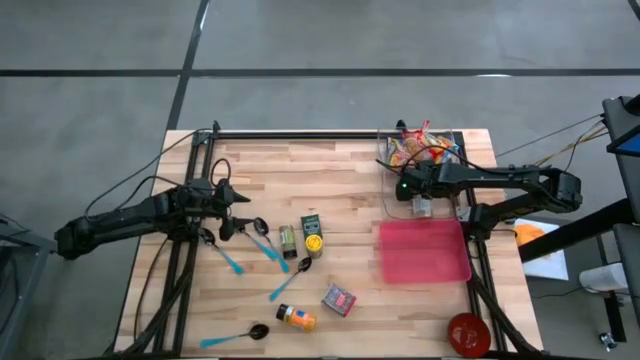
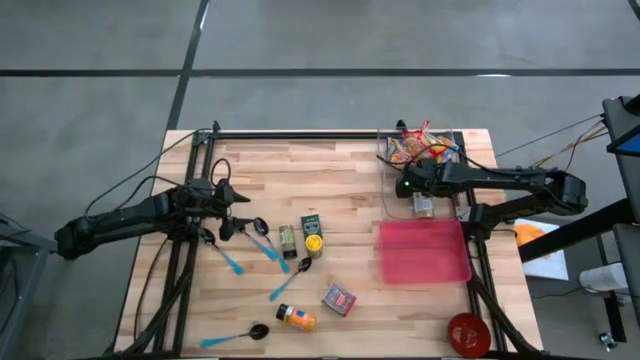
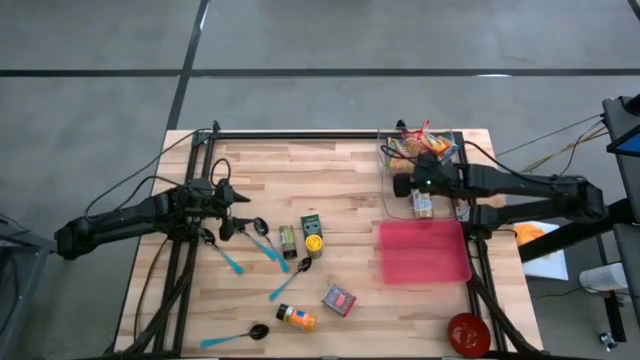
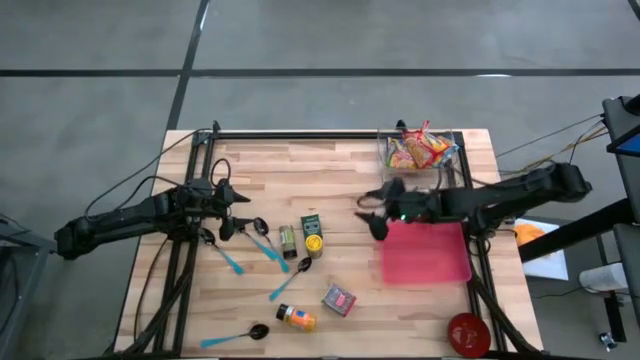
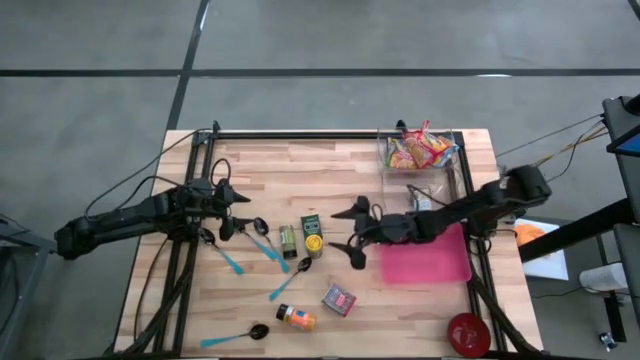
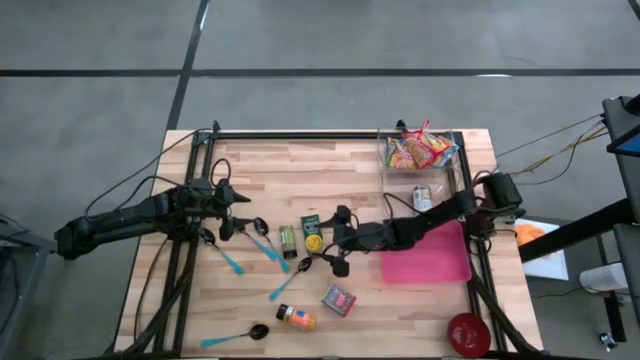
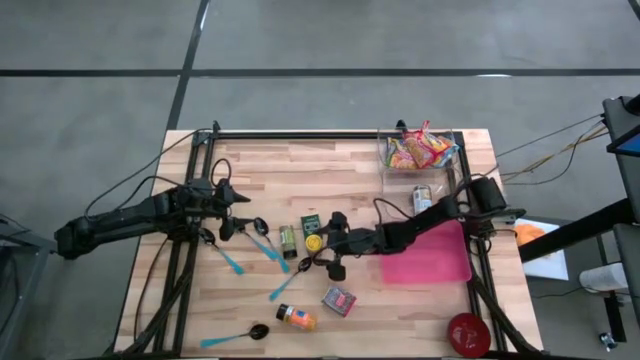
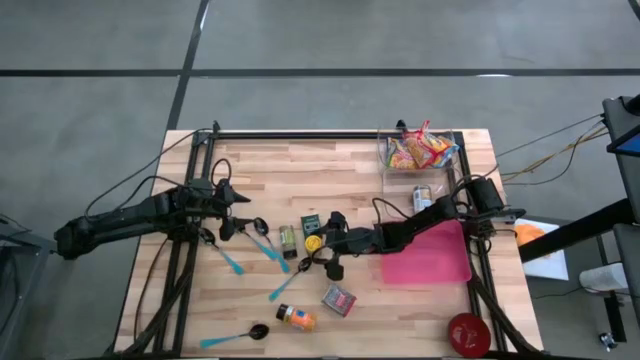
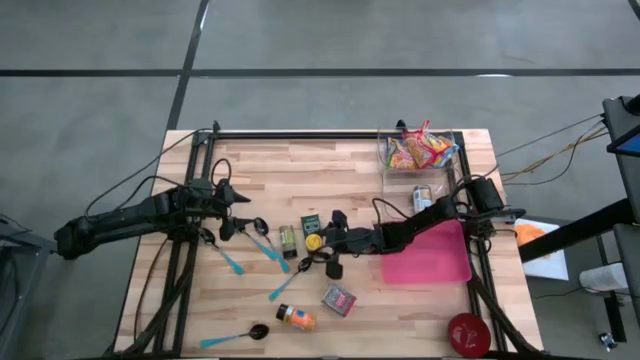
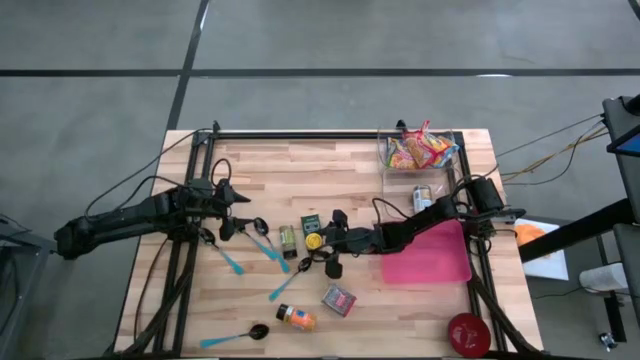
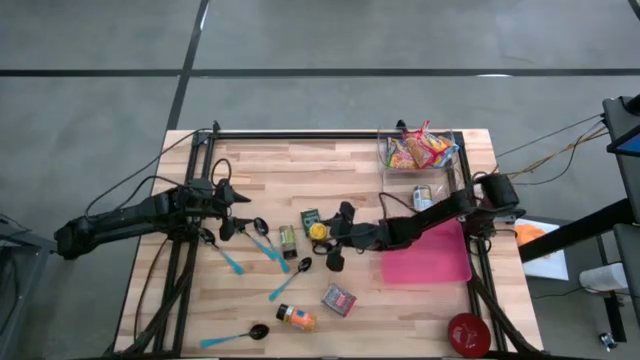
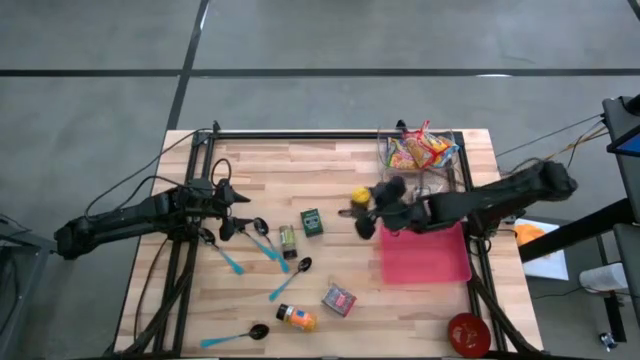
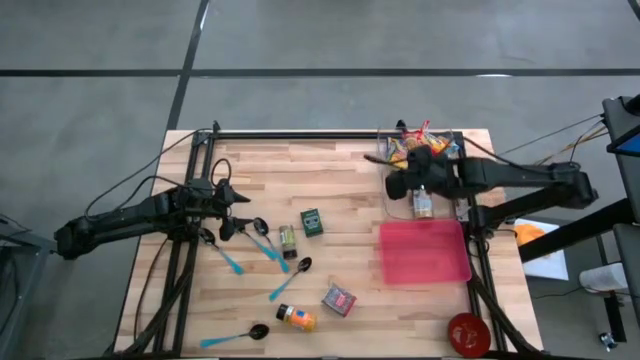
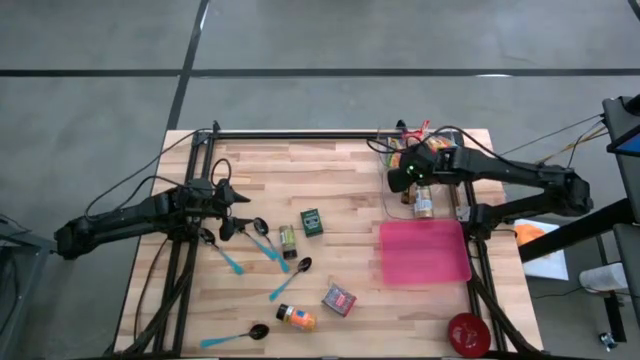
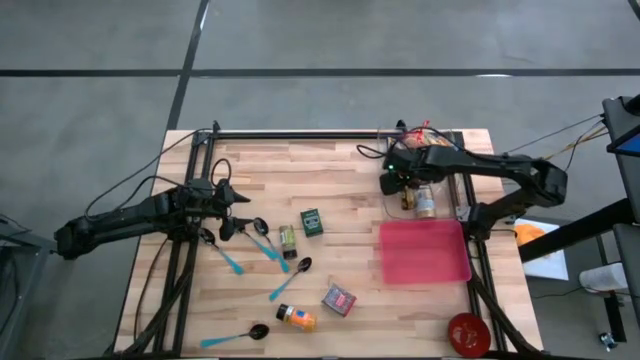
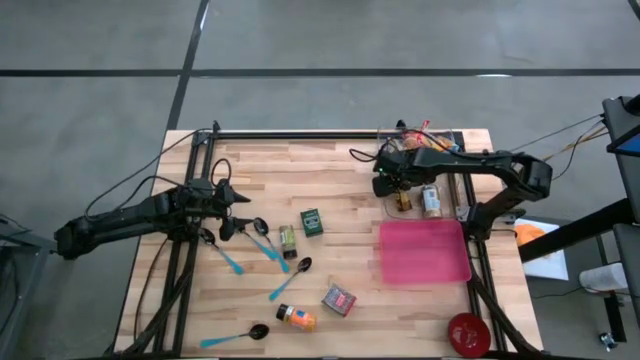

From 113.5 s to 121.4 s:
Put the yellow seasoning bottle into the bottom transparent bin

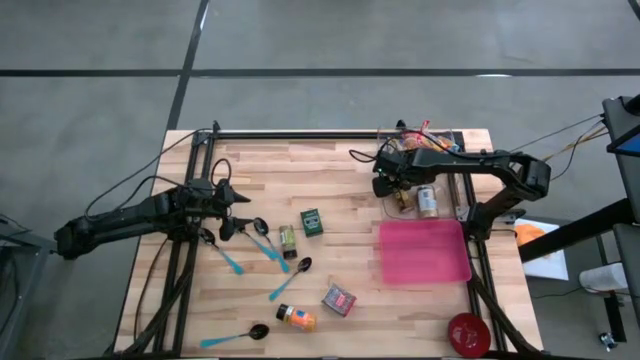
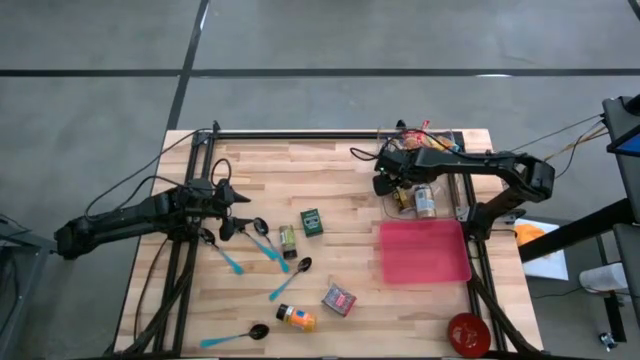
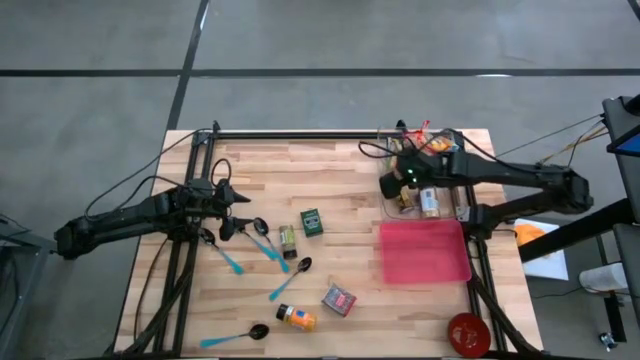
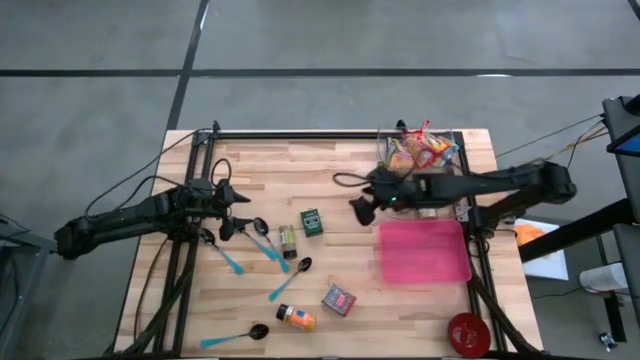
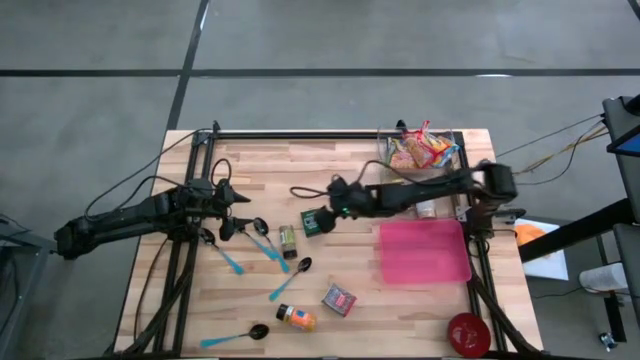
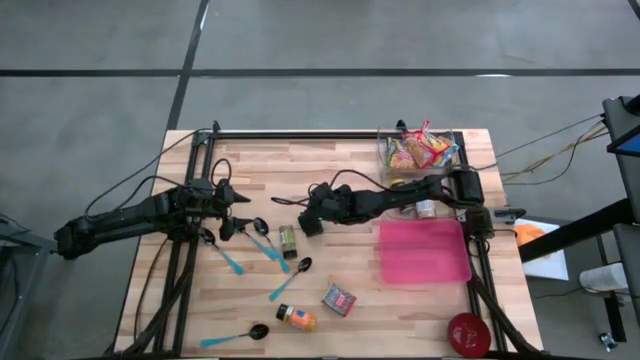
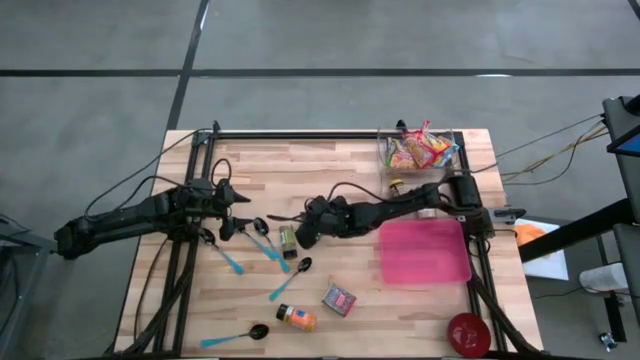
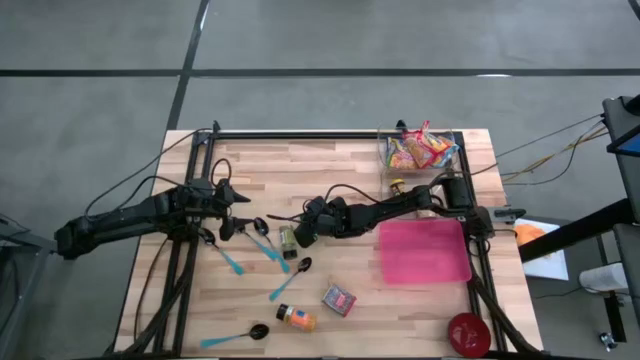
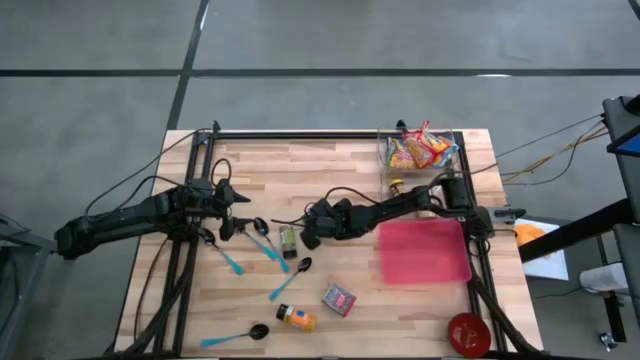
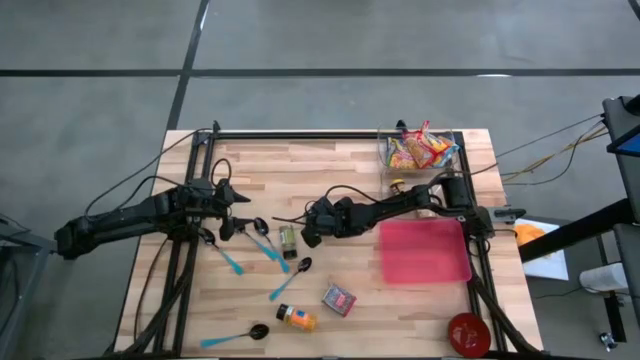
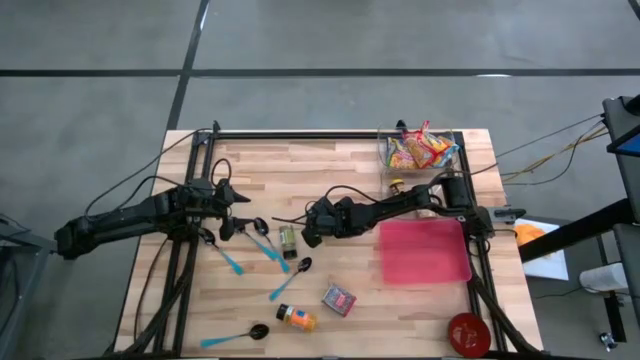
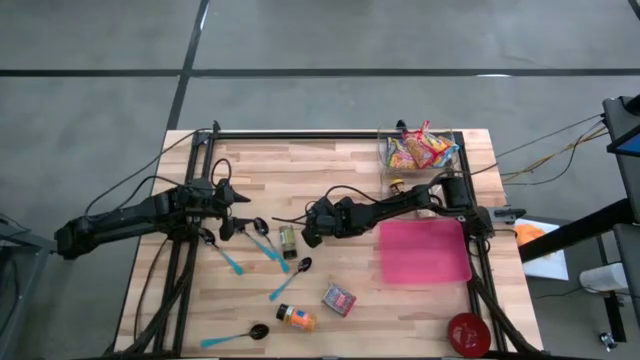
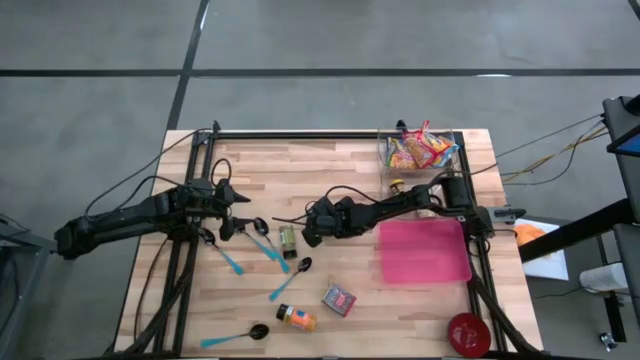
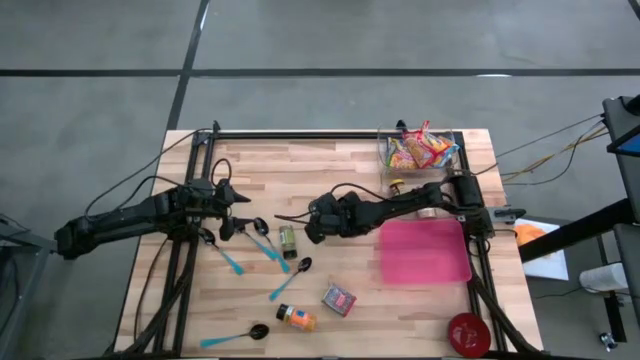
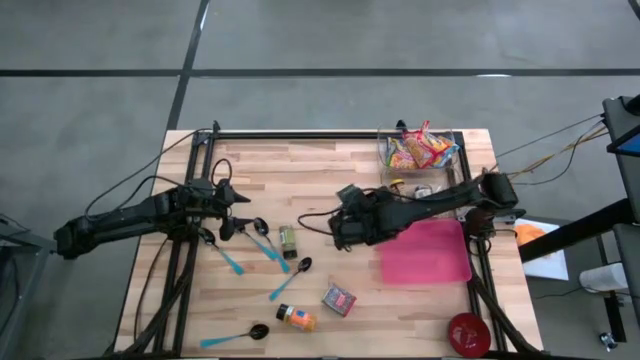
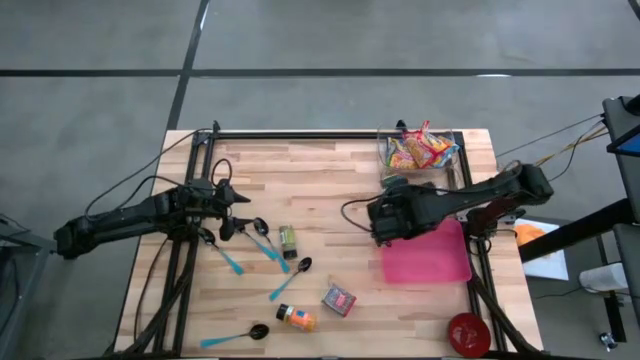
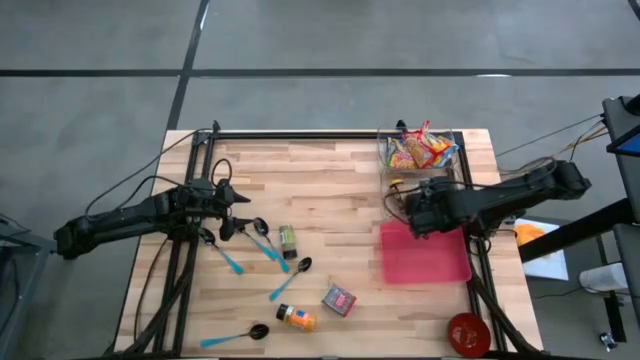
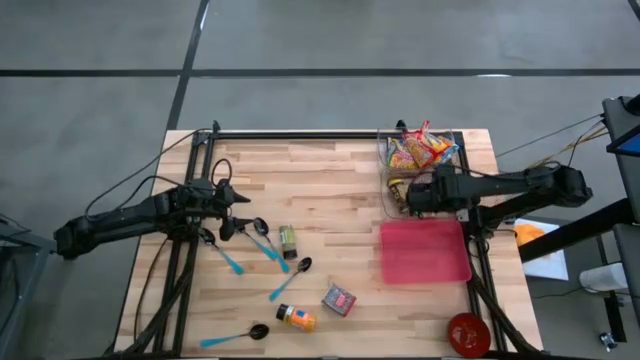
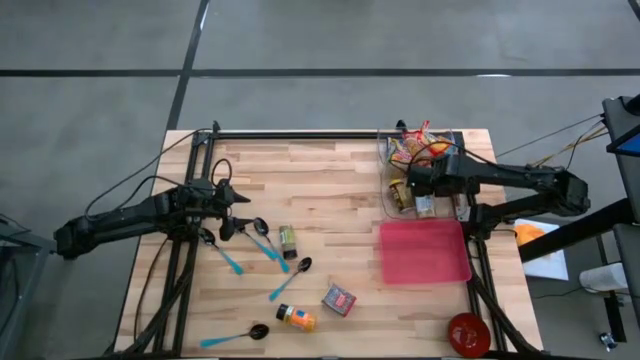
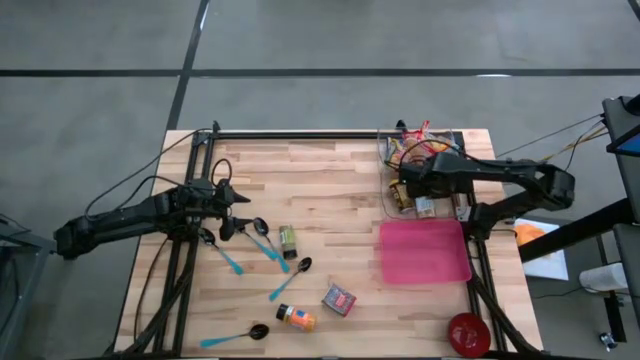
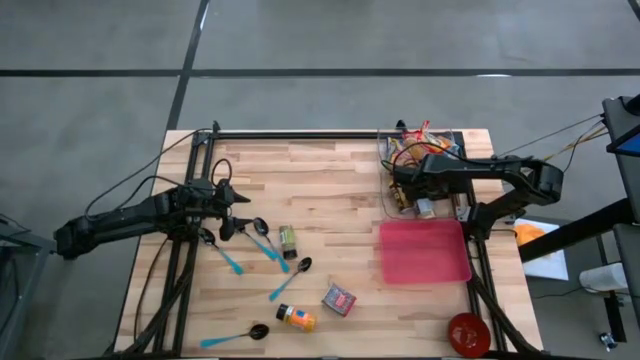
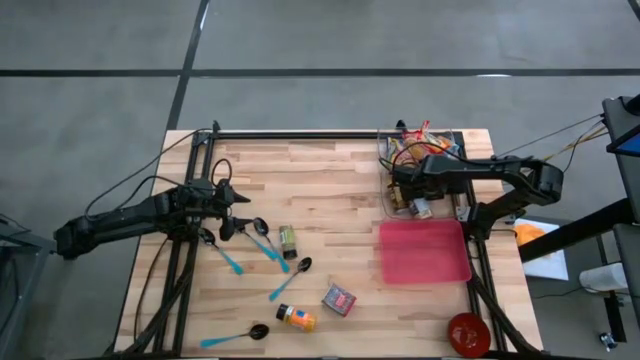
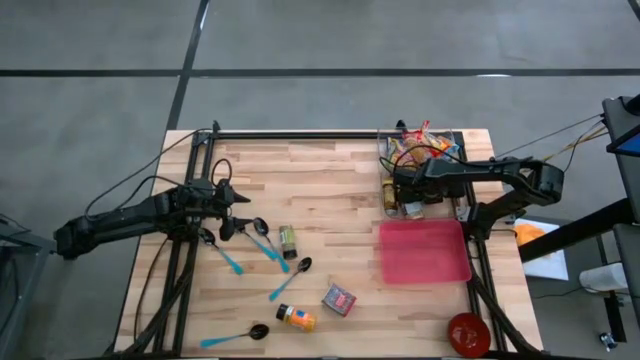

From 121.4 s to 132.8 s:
Put the black and green seasoning can into the bottom transparent bin
